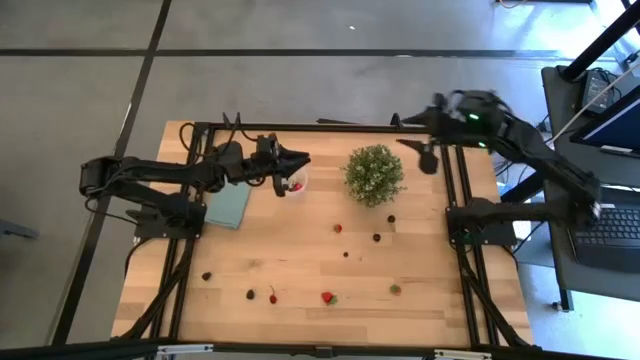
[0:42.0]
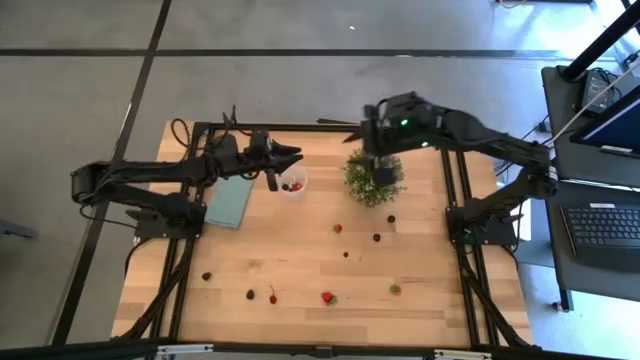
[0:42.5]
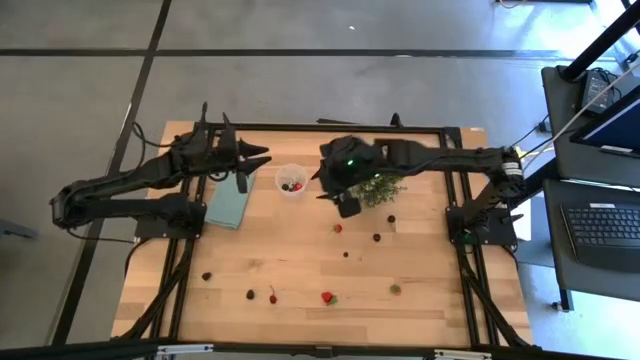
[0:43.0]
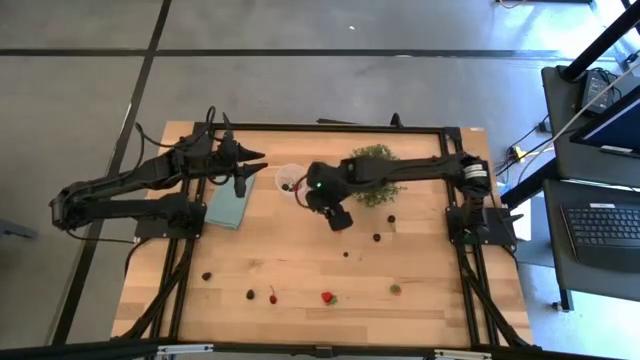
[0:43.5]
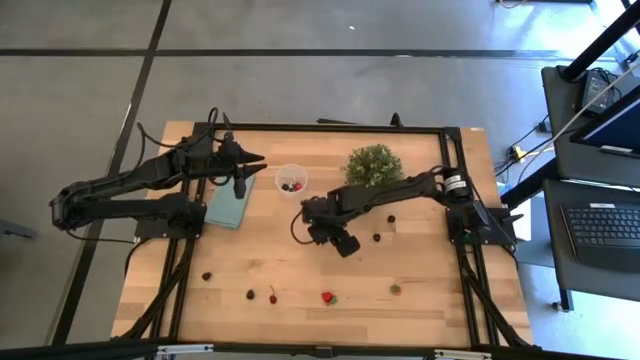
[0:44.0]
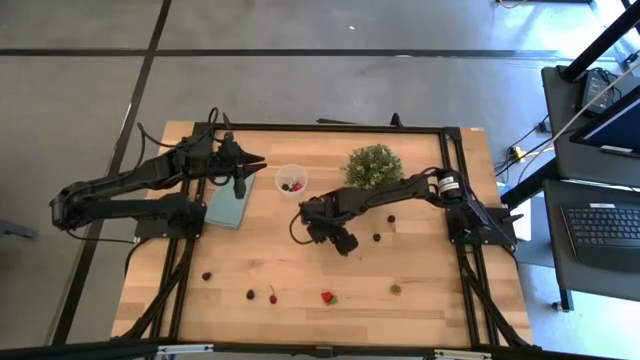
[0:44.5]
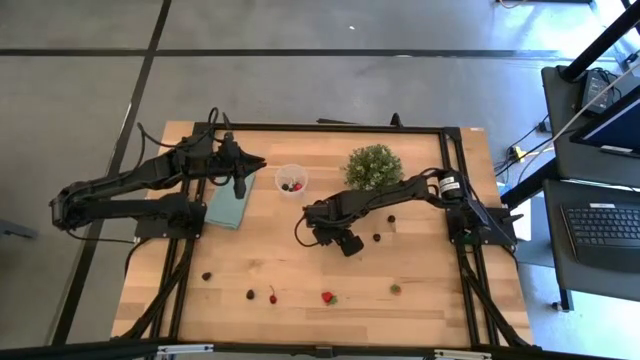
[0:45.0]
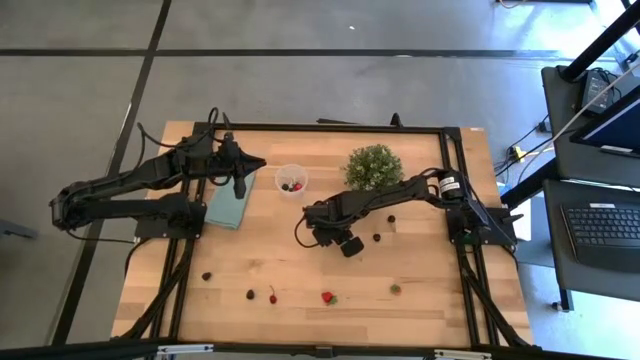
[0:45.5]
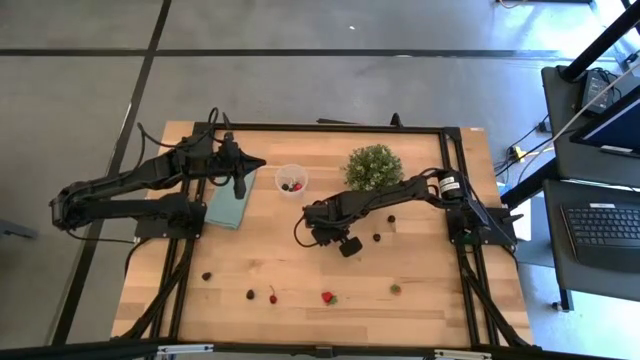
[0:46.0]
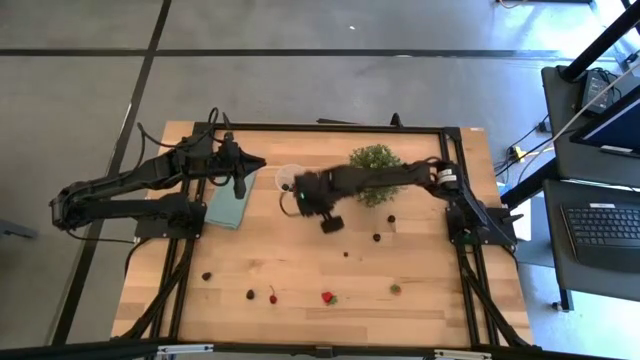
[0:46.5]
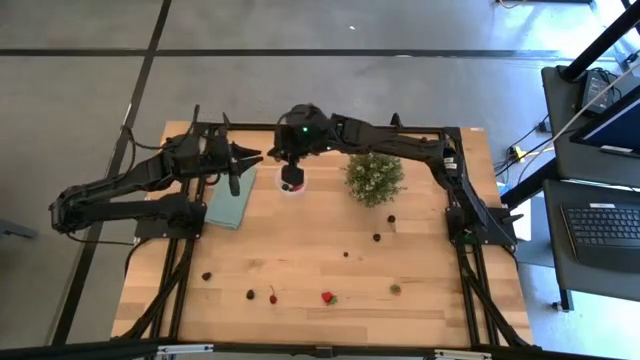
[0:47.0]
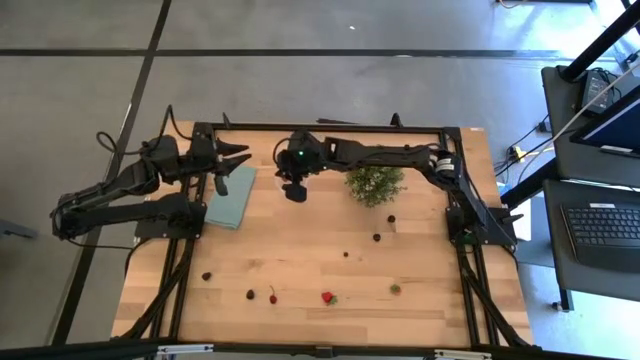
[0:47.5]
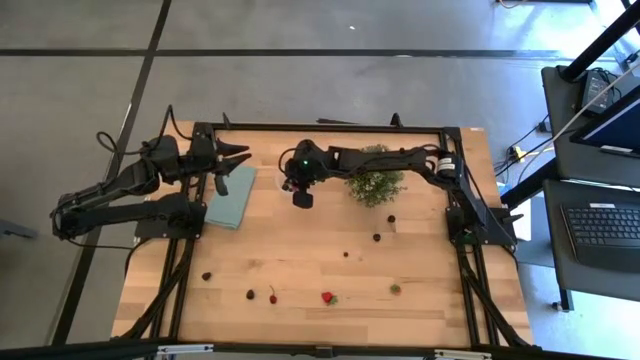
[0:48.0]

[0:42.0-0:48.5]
Task: Pick and placing Produce into tupperware
Put the red strawberry into the transparent container

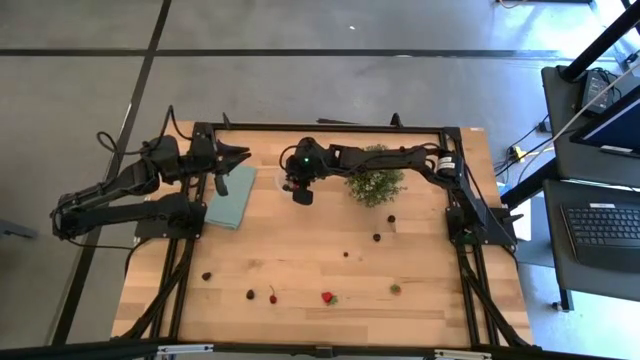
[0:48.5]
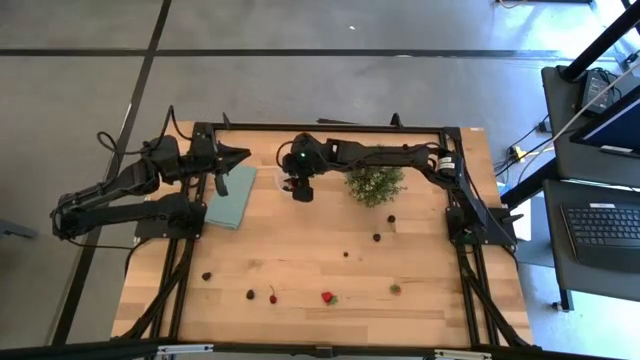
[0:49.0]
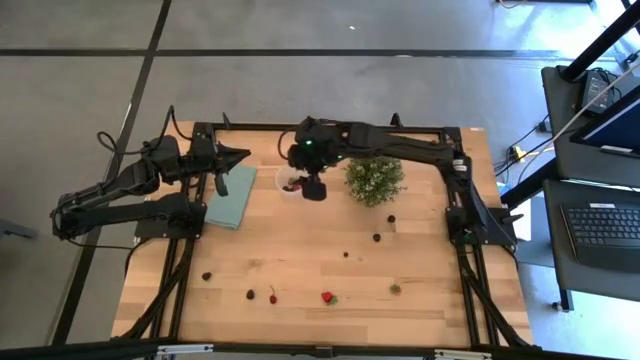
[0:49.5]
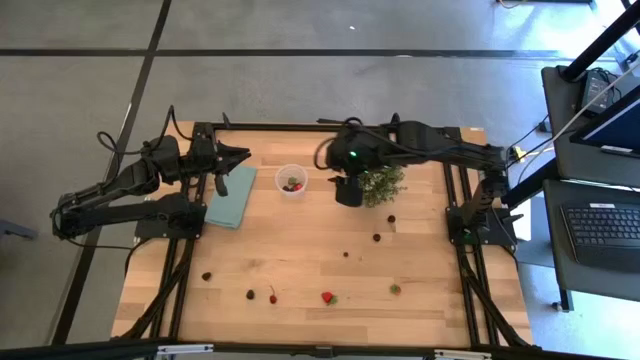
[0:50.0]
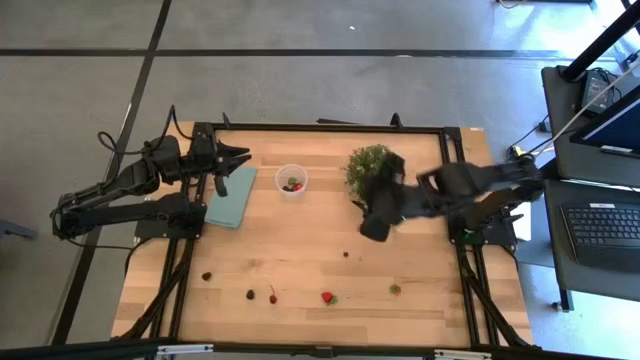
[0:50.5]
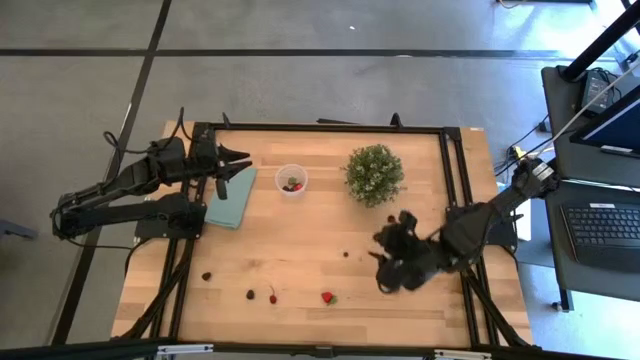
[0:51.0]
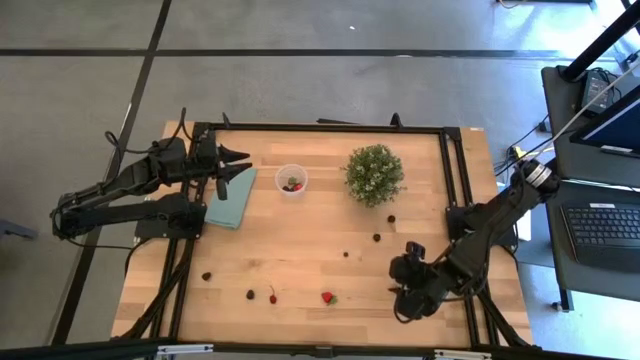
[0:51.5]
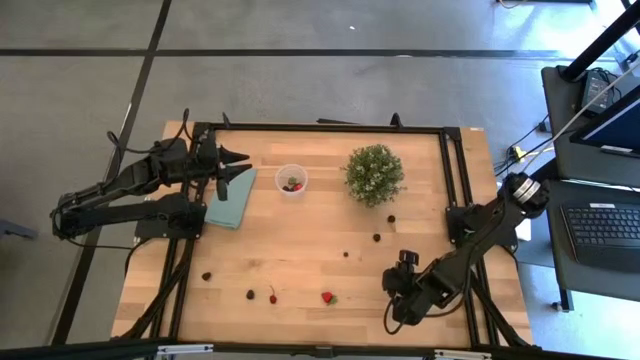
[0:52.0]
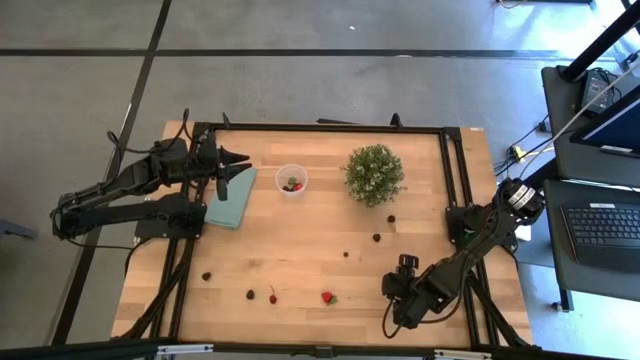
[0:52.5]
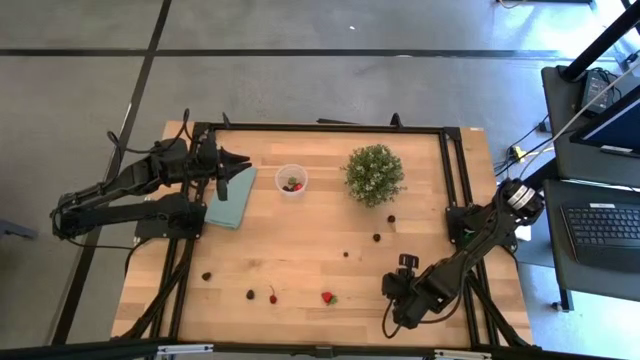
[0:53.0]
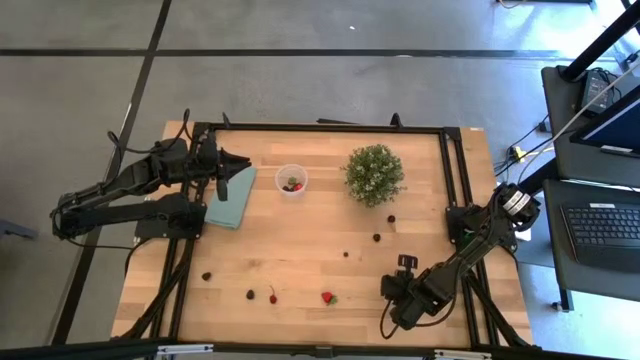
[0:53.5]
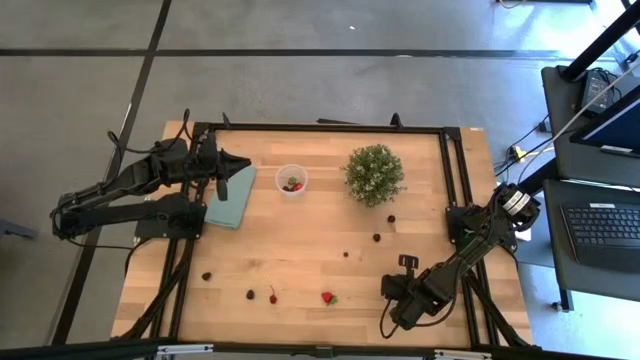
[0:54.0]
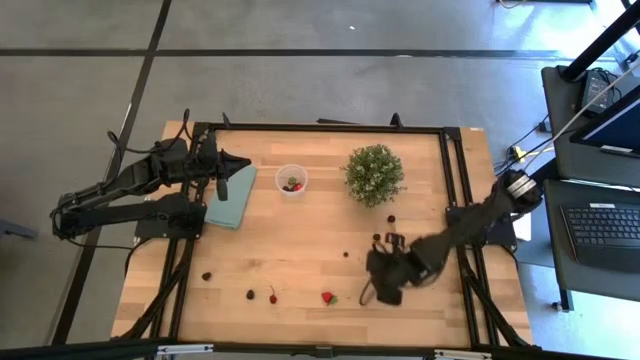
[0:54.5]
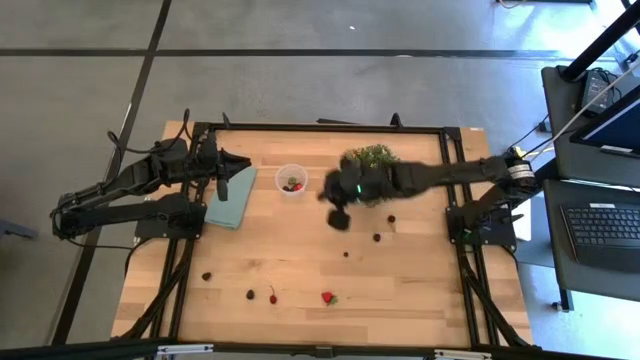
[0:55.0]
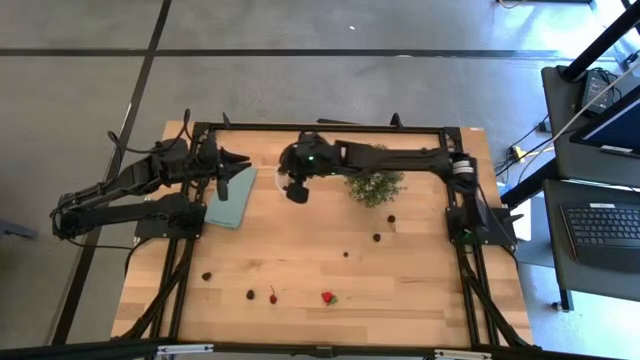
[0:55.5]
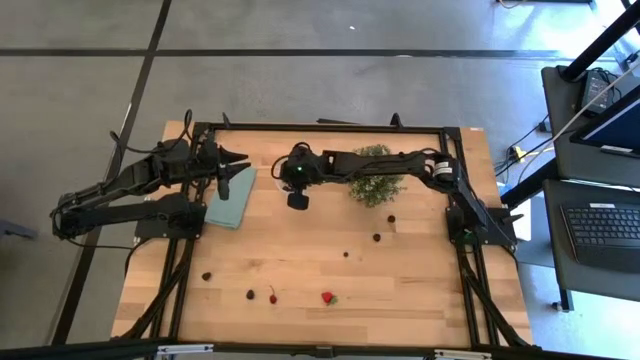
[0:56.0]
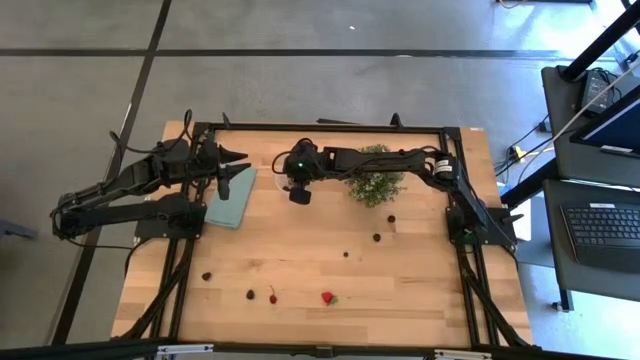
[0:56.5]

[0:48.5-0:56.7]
Put the red strawberry into the transparent container

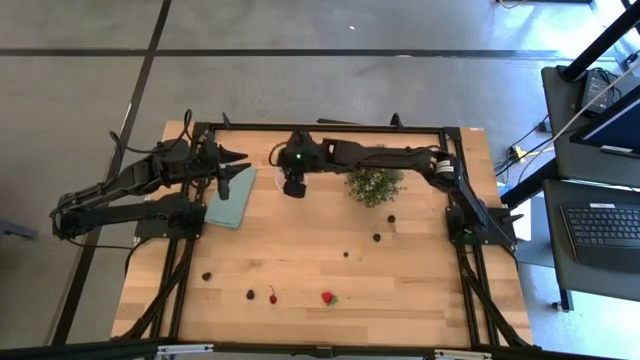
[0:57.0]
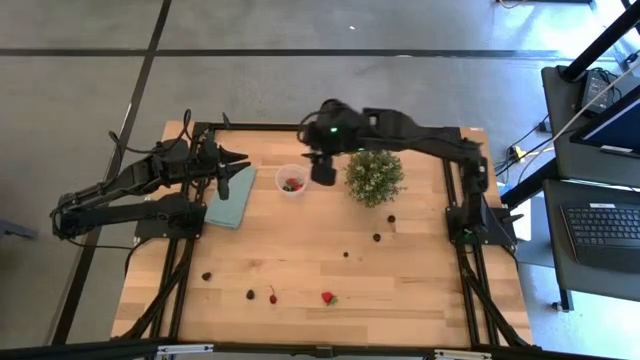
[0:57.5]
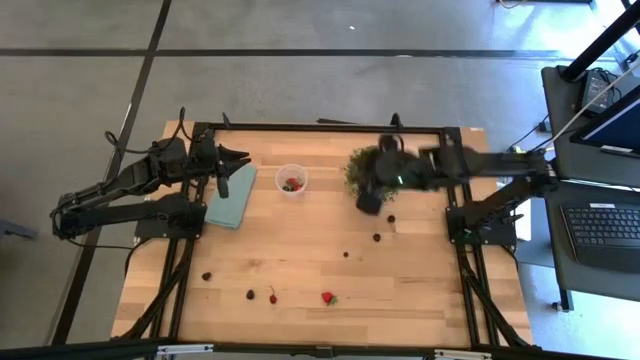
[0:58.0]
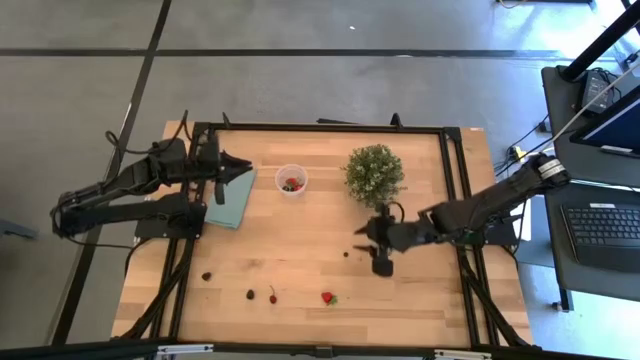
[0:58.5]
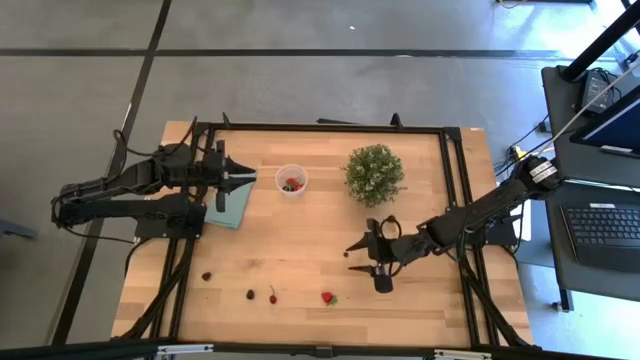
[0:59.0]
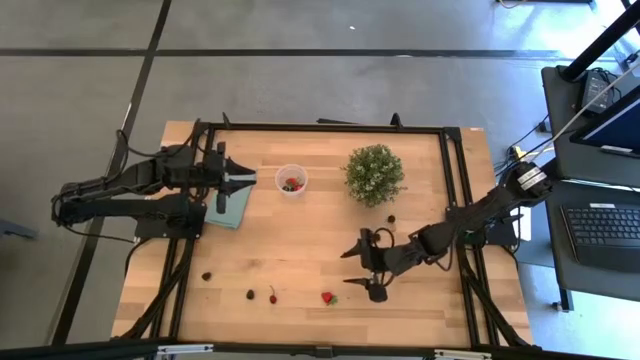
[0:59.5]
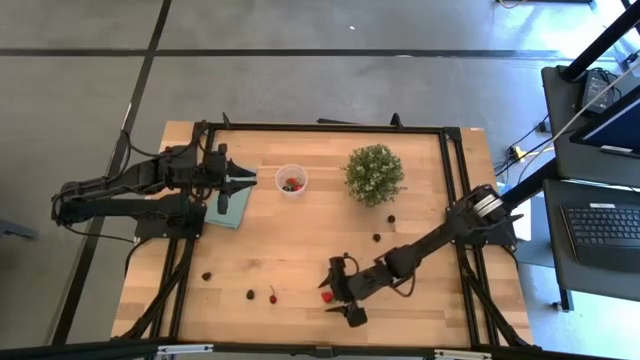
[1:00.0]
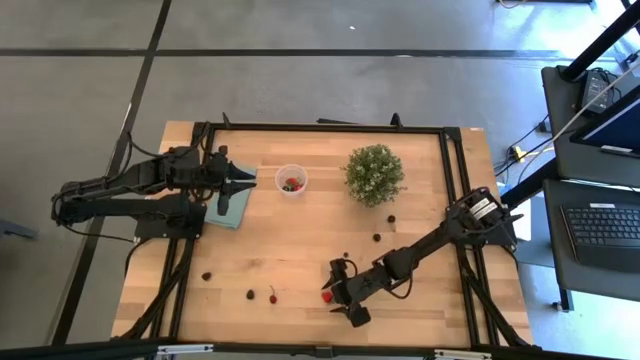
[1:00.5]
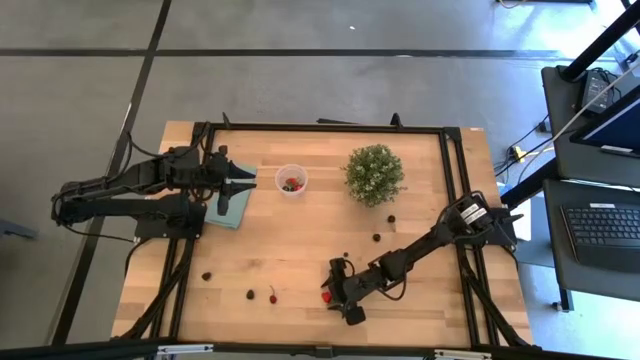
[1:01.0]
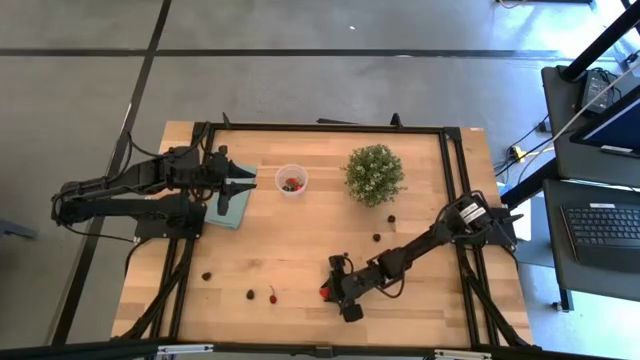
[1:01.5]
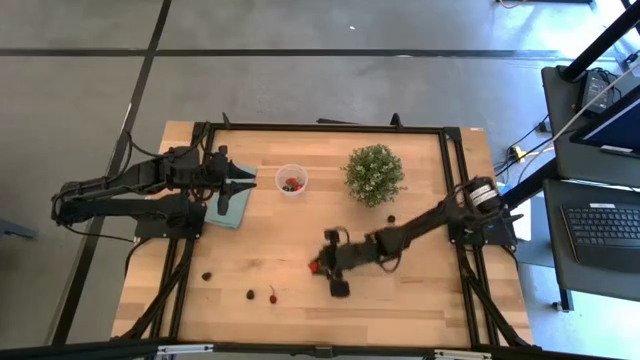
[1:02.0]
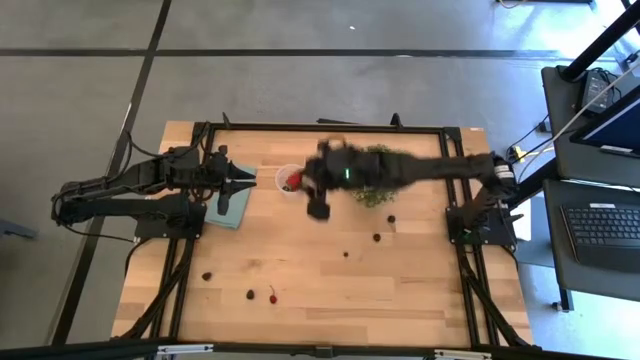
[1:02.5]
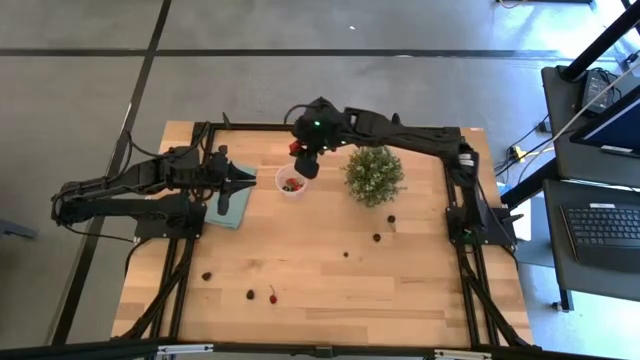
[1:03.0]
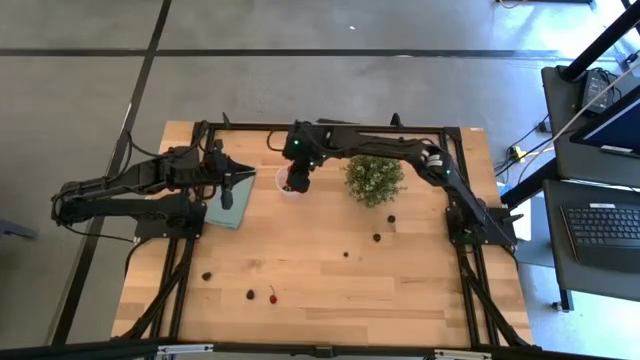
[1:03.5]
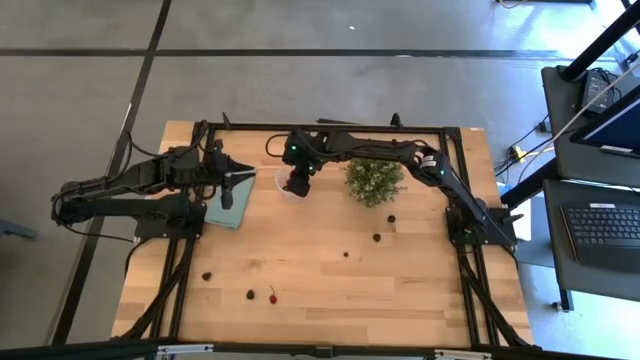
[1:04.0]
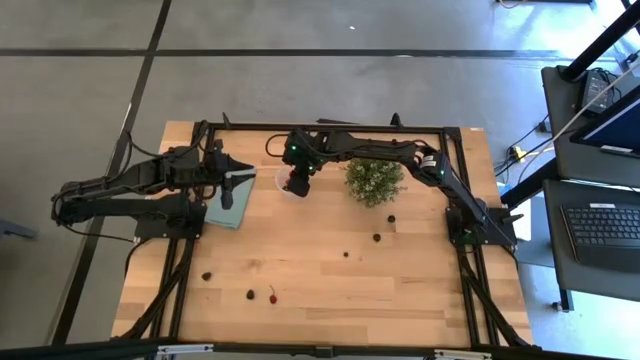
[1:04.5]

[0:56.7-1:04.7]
Put the red strawberry into the transparent container
